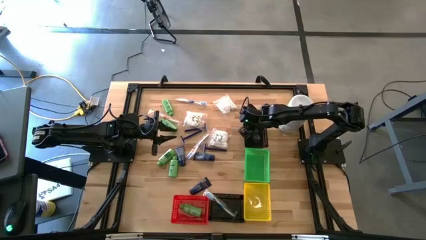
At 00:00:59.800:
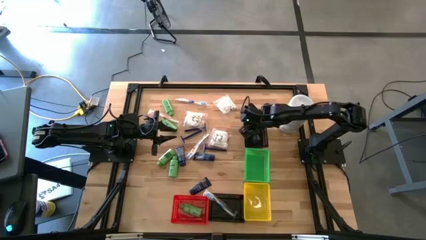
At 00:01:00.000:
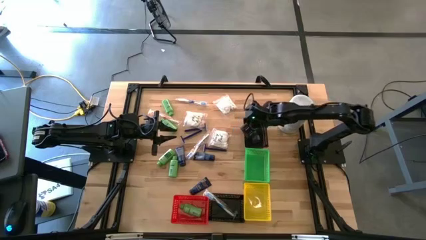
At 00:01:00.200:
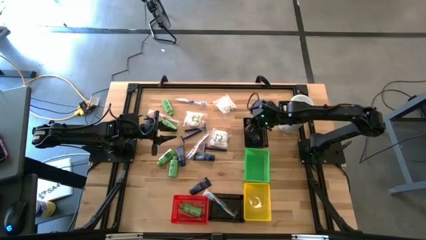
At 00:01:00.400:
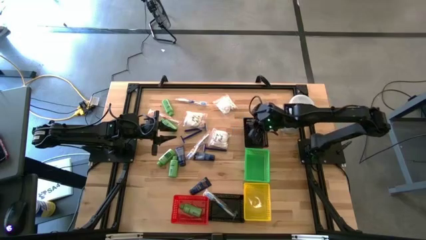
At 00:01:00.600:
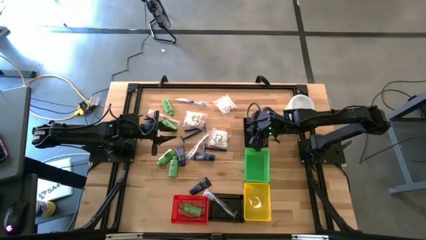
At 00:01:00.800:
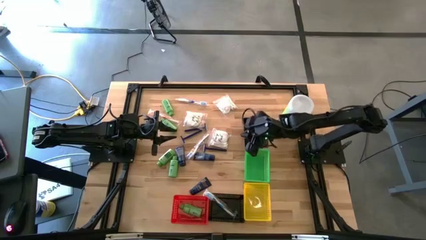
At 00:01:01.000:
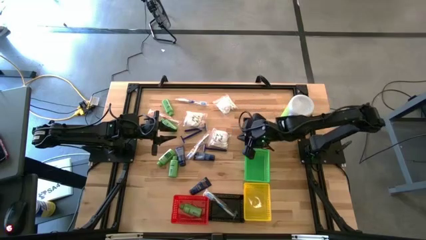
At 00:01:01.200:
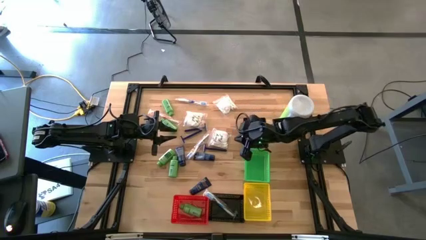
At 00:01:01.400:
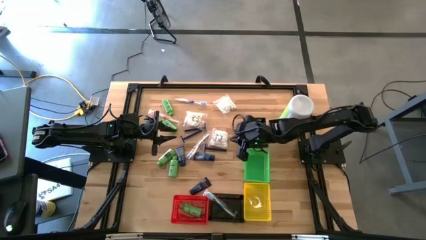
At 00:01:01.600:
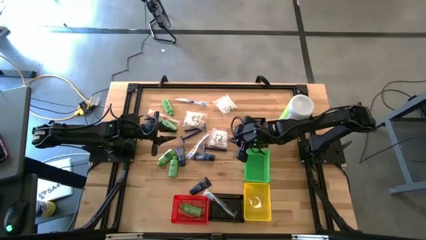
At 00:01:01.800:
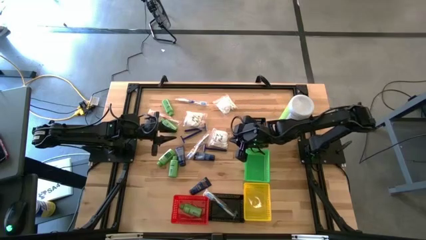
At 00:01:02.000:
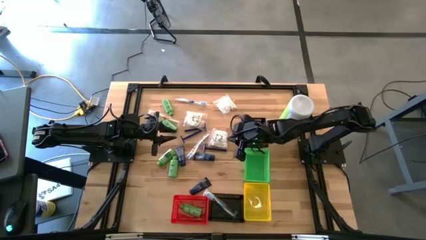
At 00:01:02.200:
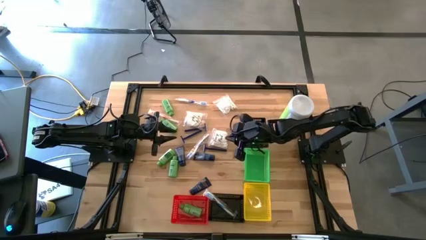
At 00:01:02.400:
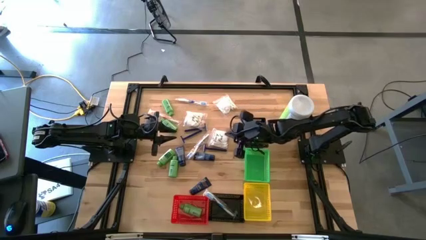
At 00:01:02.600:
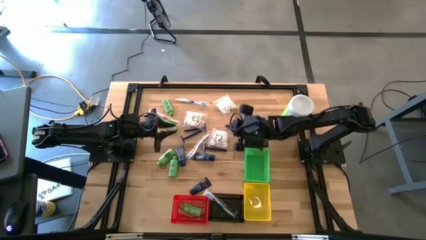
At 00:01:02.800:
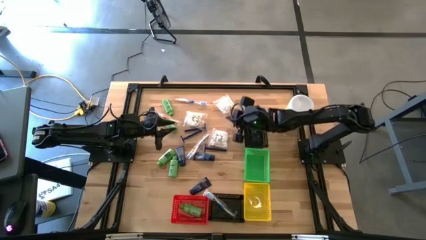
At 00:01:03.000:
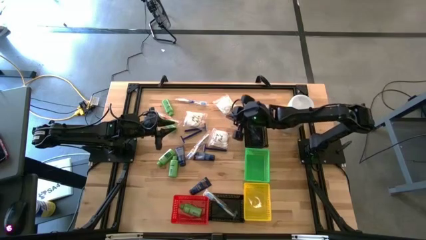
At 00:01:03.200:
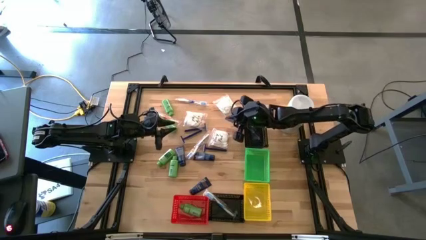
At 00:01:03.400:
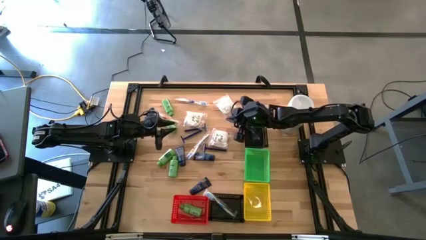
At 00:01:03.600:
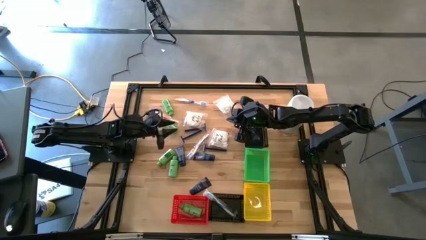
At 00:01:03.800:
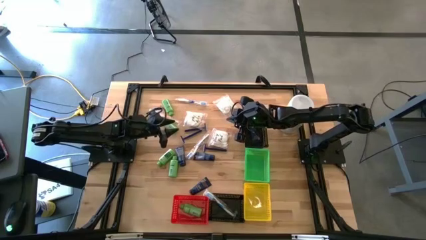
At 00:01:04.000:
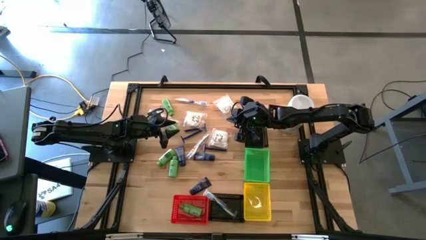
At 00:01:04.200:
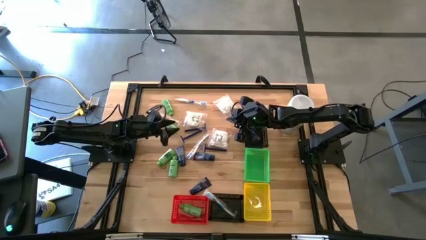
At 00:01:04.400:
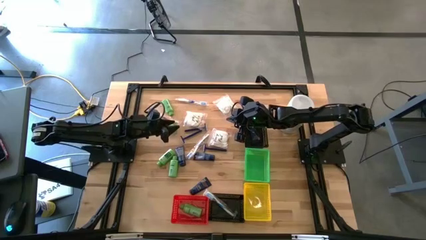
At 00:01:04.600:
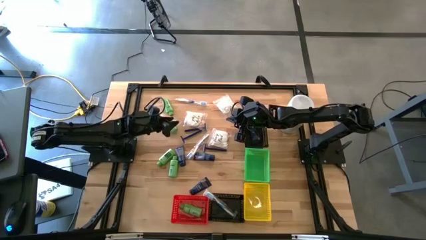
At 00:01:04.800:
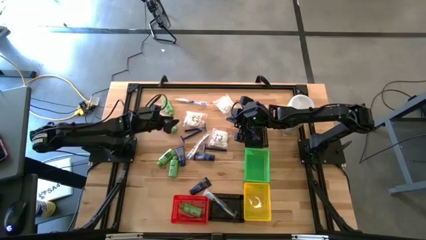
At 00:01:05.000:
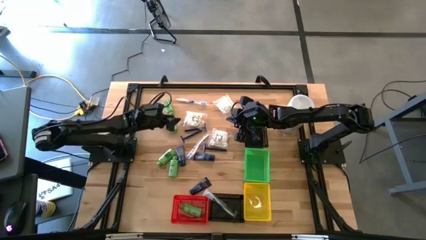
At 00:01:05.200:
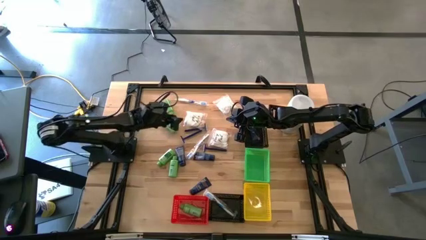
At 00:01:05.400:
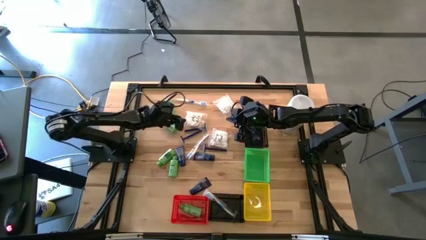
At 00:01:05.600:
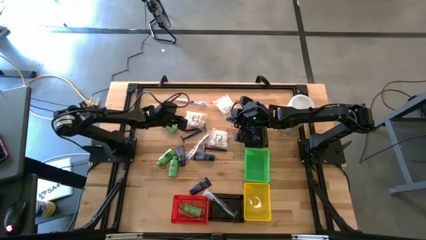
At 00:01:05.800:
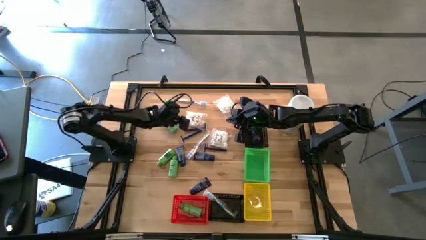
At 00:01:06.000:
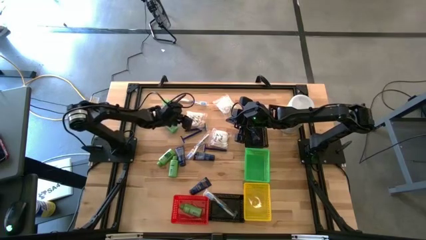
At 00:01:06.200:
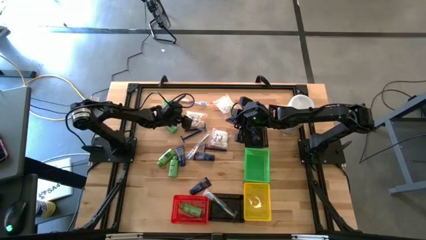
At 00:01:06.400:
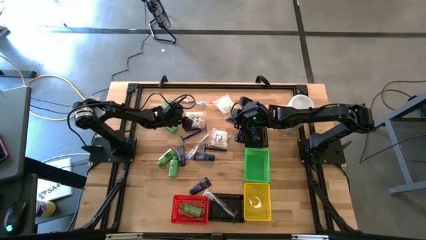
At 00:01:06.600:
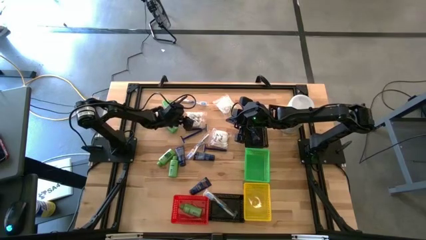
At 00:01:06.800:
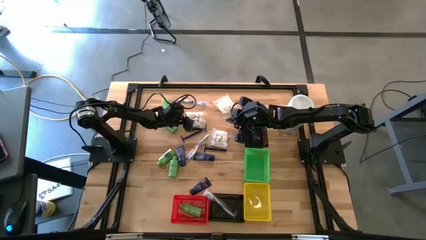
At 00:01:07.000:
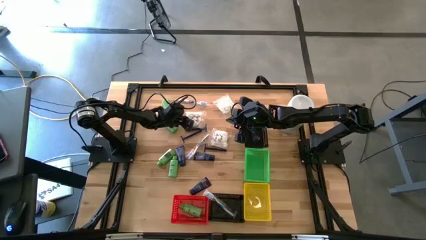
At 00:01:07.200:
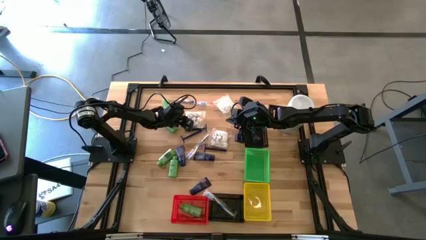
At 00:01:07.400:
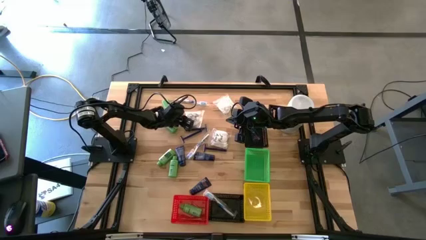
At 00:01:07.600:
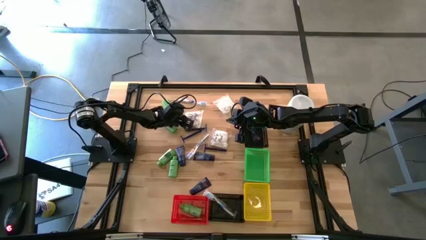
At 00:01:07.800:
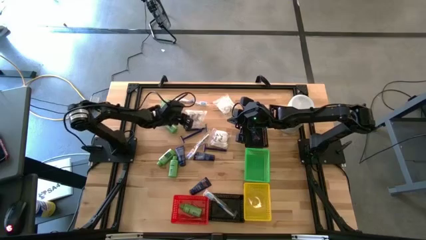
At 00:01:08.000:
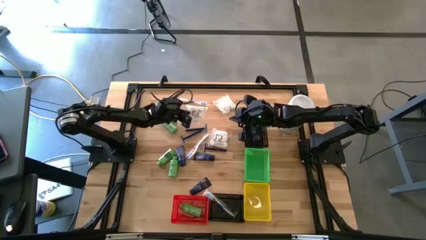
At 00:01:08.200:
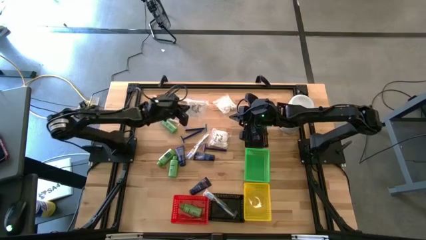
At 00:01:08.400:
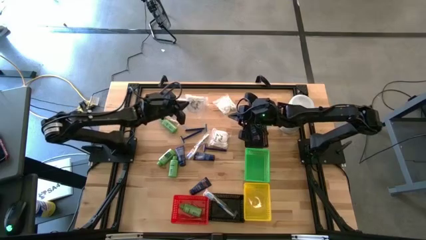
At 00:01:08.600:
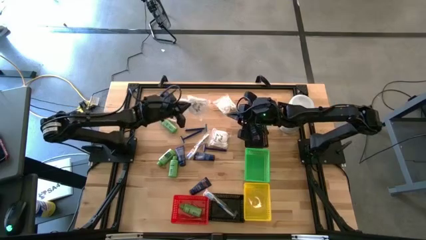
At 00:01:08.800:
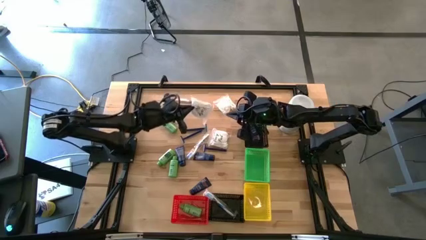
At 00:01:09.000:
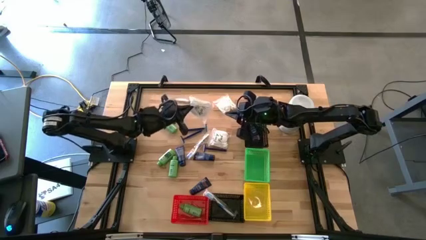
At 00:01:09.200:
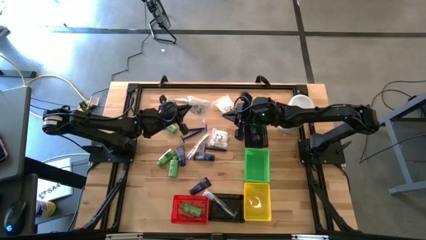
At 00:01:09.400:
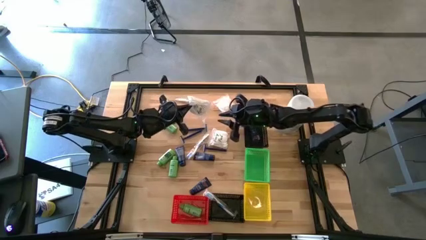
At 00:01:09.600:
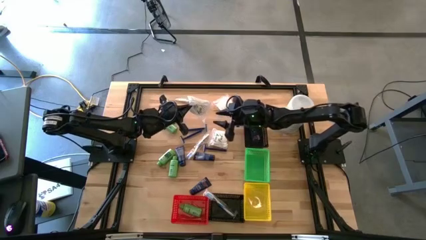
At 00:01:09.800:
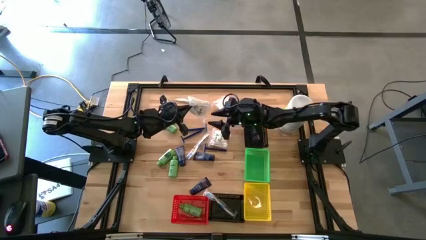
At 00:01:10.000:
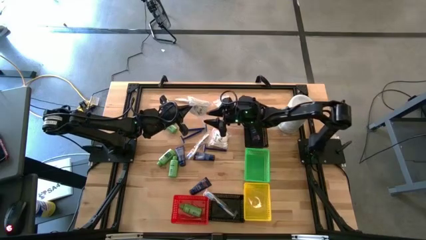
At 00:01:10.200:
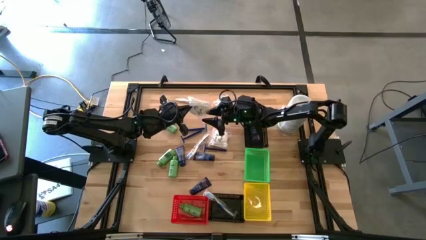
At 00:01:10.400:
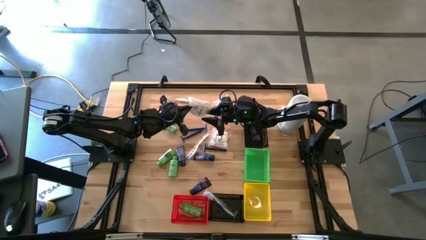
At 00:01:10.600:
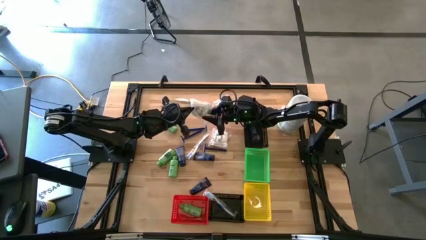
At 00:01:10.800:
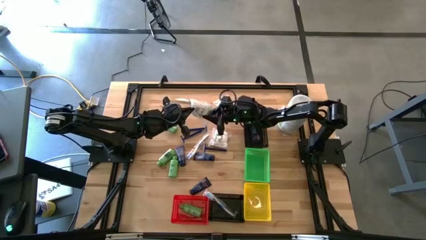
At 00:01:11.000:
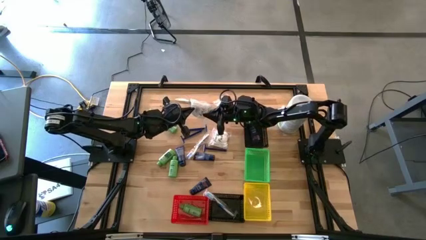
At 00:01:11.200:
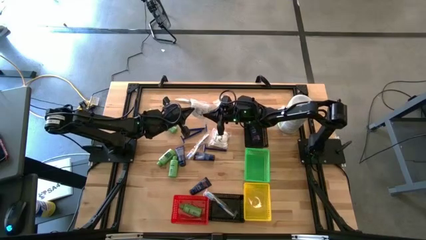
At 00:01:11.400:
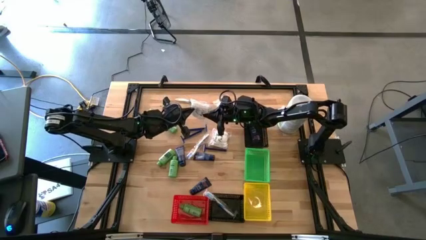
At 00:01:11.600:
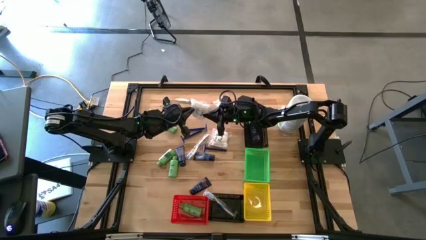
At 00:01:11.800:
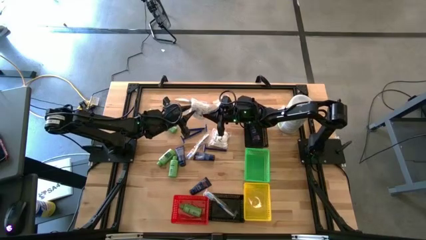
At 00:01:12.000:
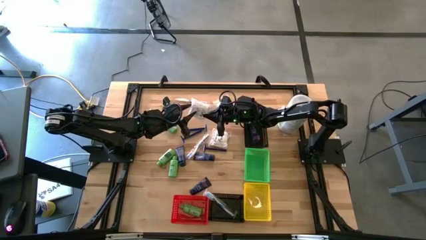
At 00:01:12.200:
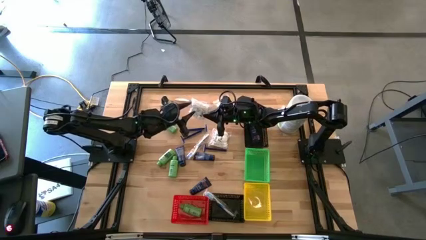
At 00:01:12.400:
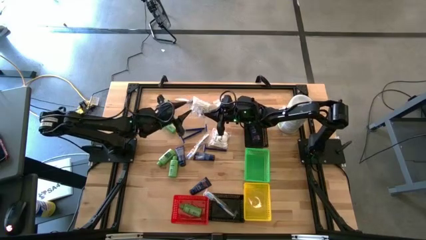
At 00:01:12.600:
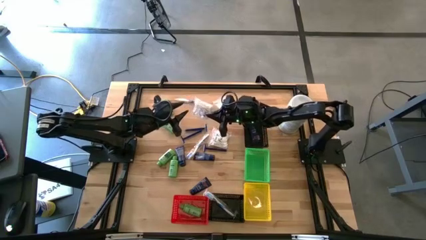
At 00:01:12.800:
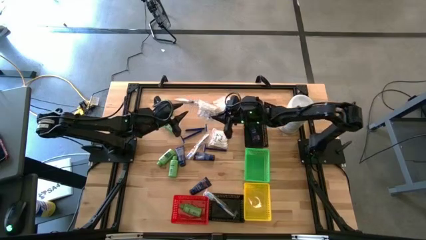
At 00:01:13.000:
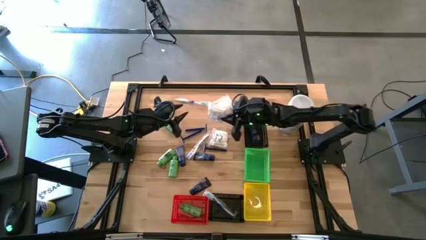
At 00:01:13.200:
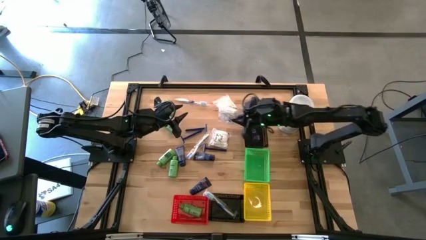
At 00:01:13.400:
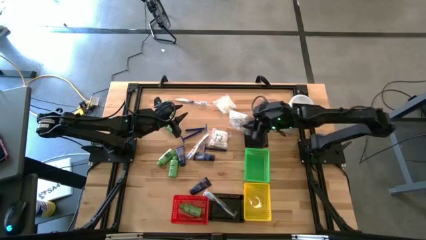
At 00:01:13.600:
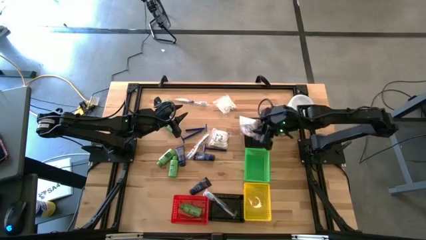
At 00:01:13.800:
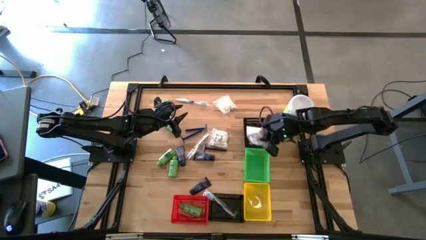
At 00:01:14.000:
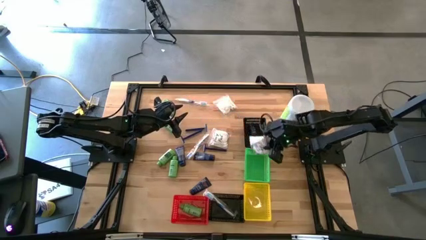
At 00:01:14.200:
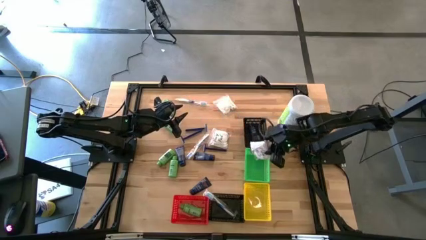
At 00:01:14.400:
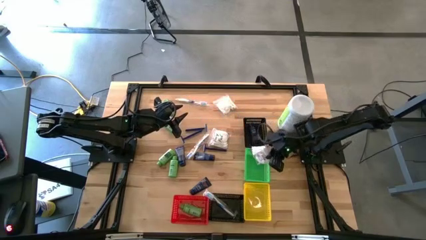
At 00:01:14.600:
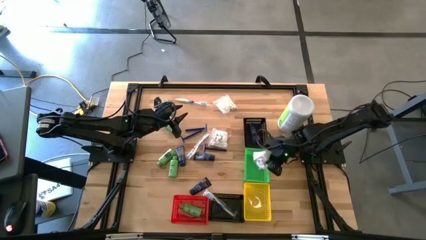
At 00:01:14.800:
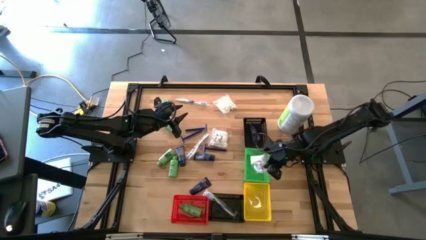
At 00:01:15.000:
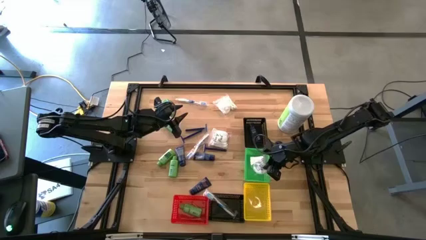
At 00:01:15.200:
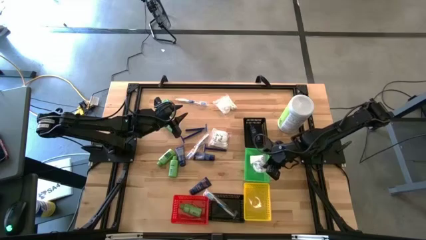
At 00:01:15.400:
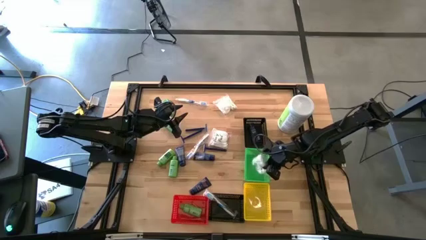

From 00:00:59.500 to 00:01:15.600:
Task: Pick & Place Travel size toiletries
Put the middle cotton pack into the green bin
